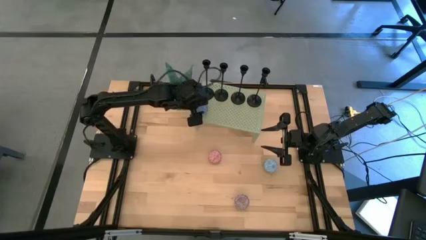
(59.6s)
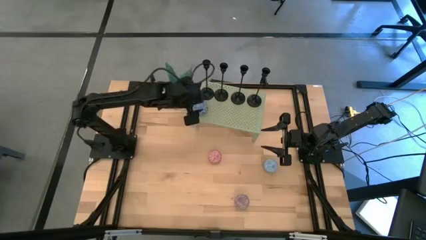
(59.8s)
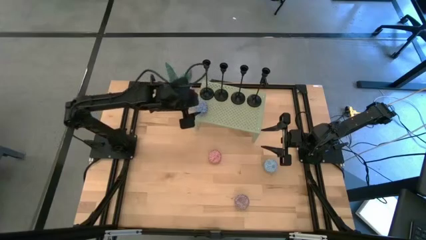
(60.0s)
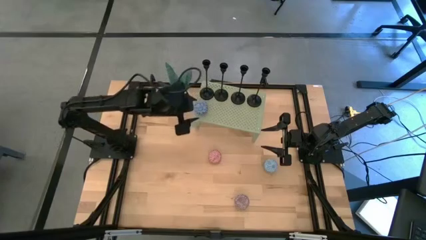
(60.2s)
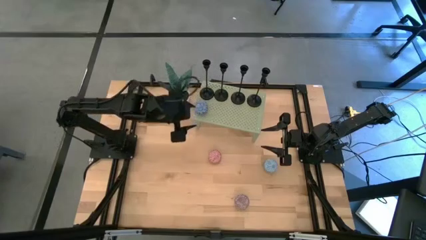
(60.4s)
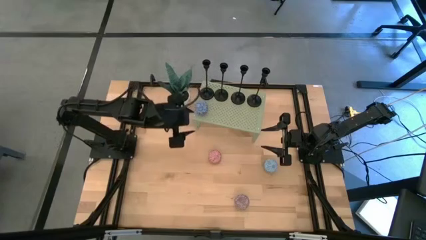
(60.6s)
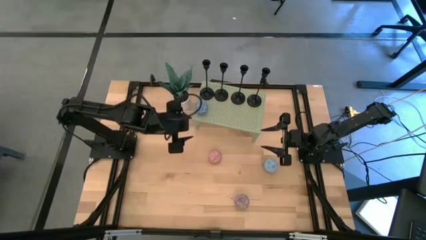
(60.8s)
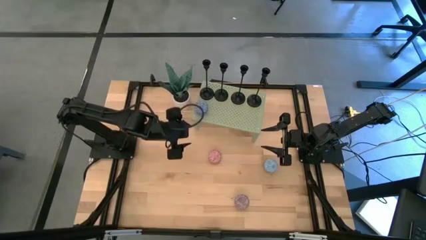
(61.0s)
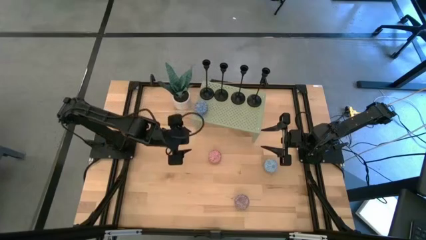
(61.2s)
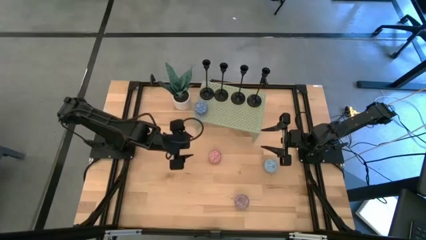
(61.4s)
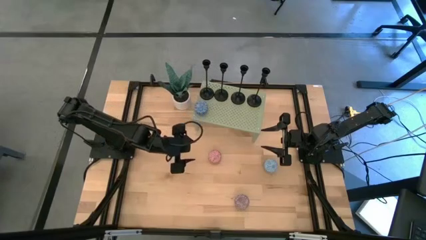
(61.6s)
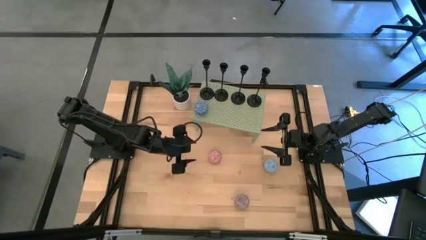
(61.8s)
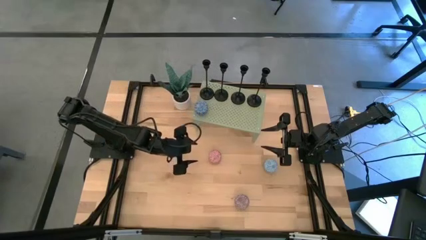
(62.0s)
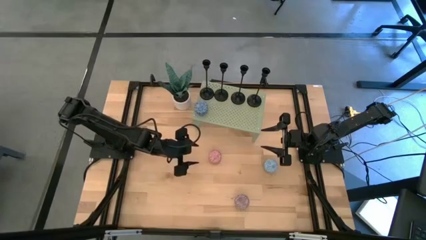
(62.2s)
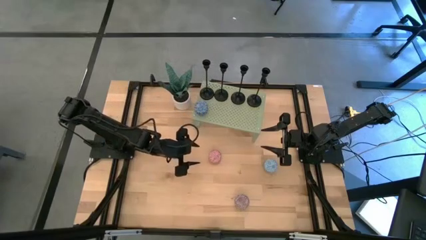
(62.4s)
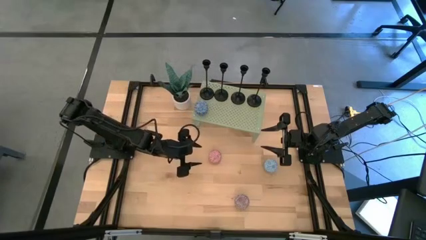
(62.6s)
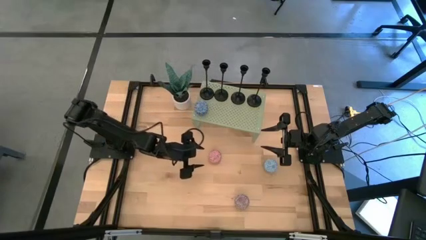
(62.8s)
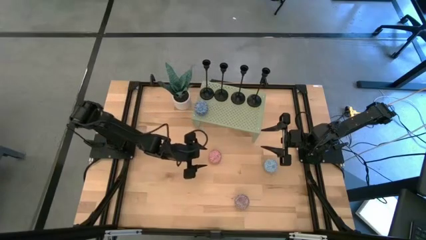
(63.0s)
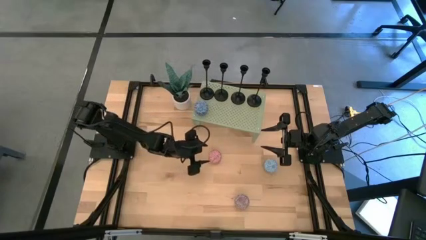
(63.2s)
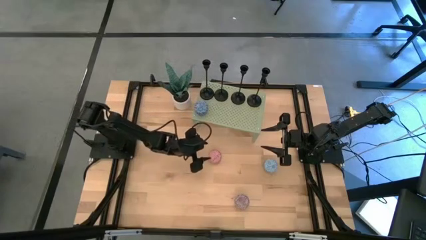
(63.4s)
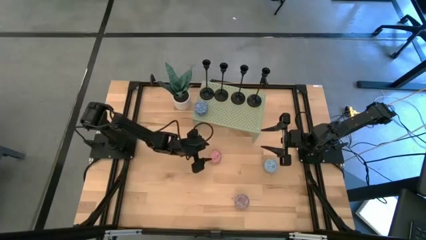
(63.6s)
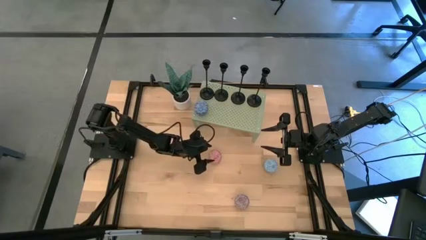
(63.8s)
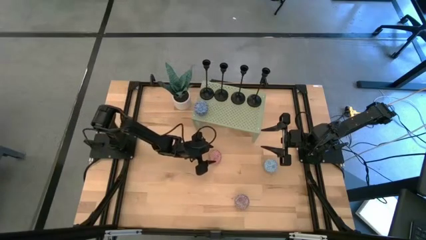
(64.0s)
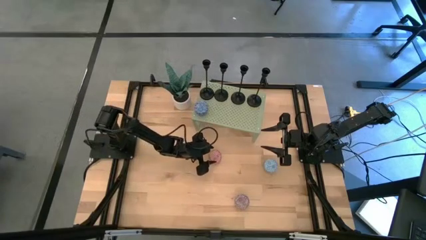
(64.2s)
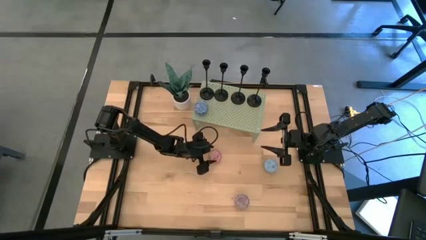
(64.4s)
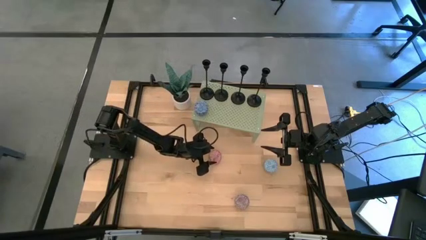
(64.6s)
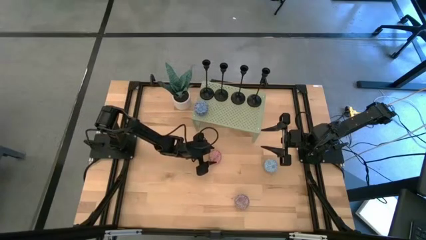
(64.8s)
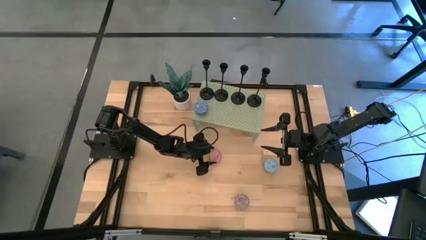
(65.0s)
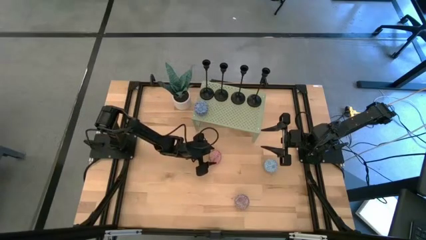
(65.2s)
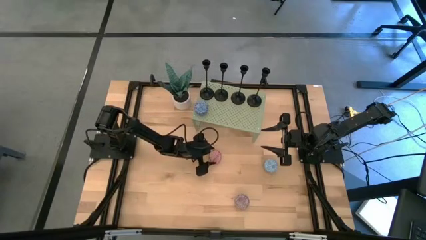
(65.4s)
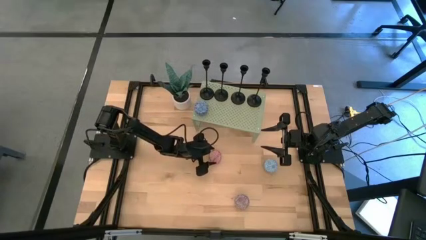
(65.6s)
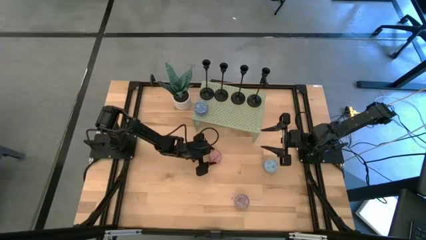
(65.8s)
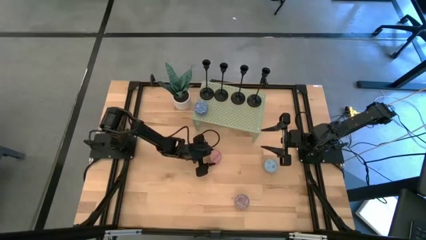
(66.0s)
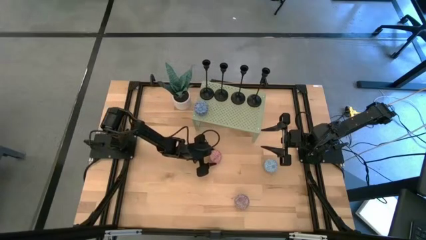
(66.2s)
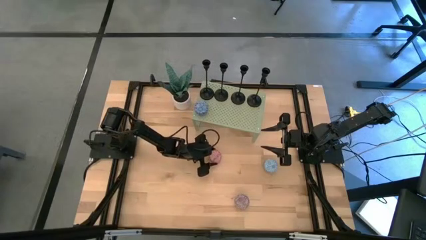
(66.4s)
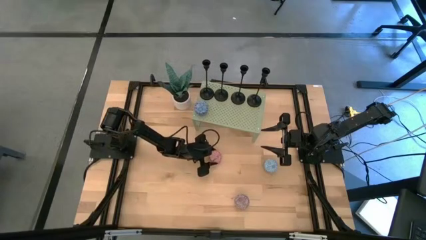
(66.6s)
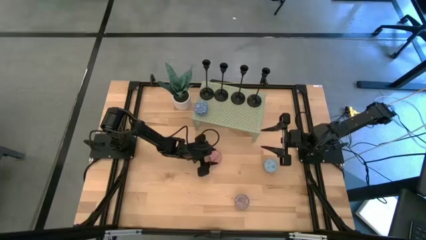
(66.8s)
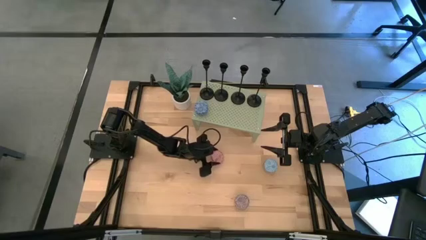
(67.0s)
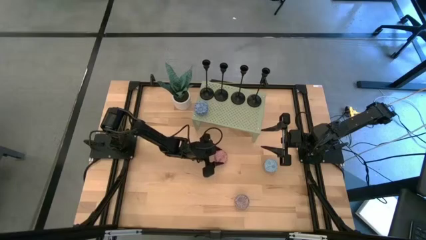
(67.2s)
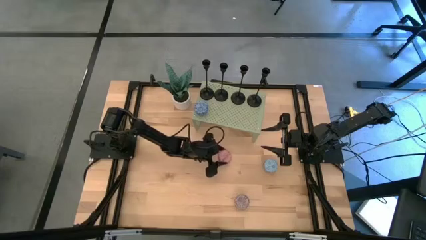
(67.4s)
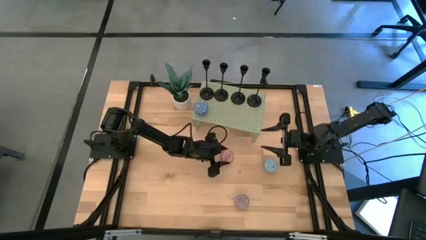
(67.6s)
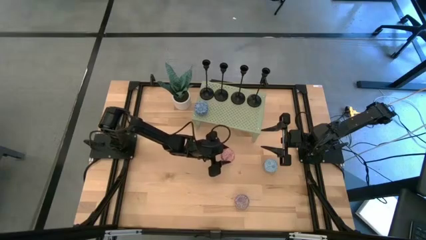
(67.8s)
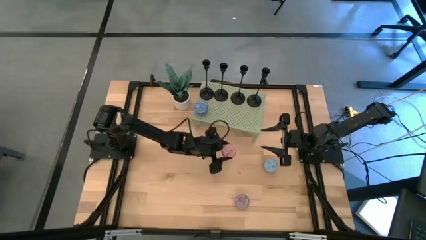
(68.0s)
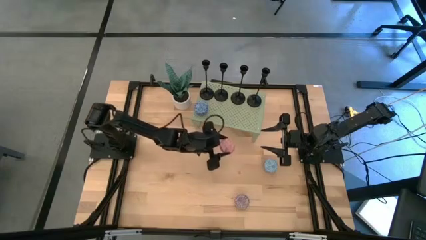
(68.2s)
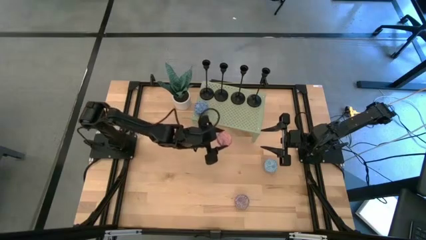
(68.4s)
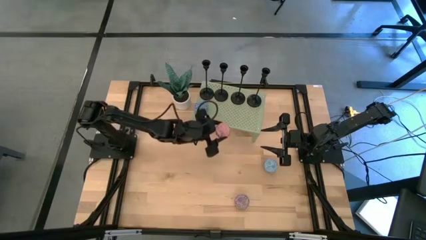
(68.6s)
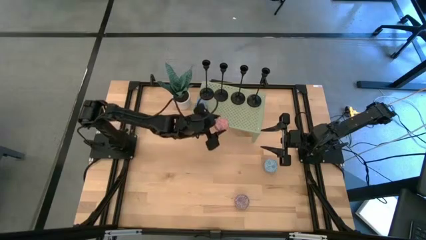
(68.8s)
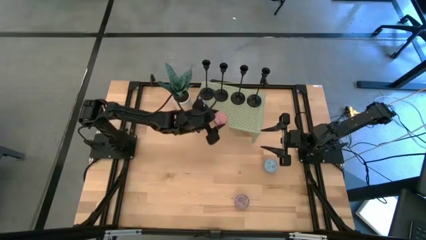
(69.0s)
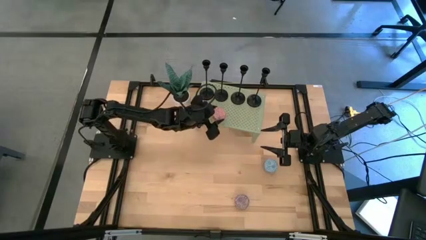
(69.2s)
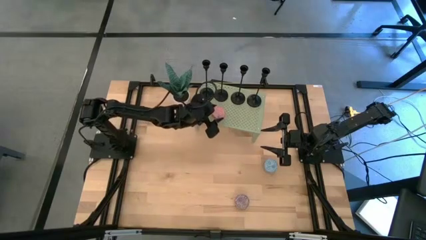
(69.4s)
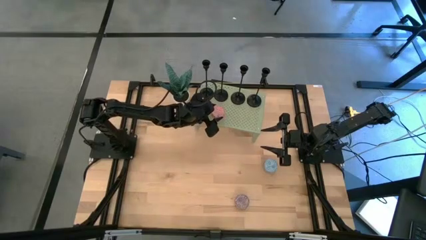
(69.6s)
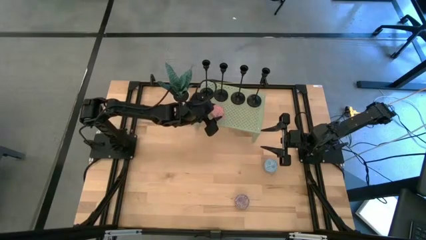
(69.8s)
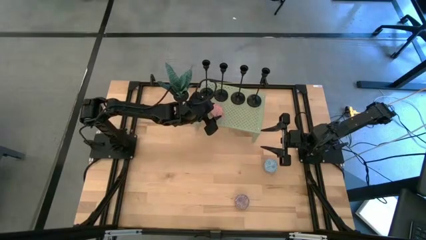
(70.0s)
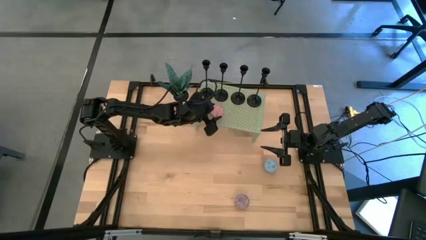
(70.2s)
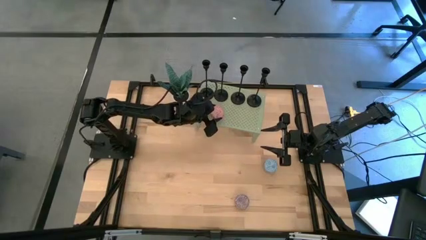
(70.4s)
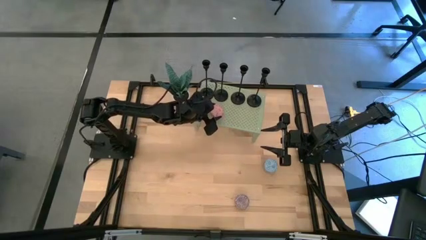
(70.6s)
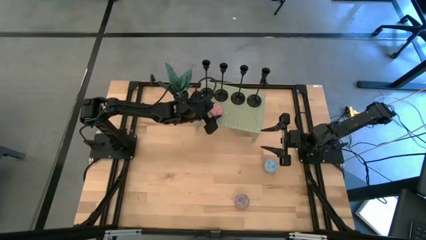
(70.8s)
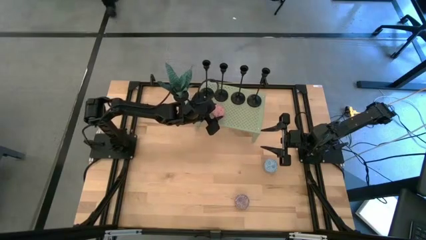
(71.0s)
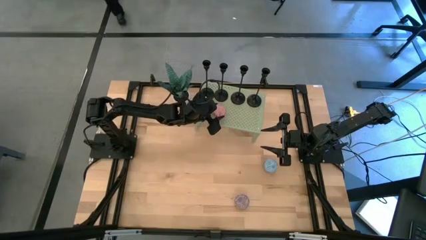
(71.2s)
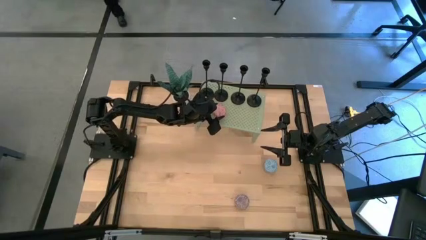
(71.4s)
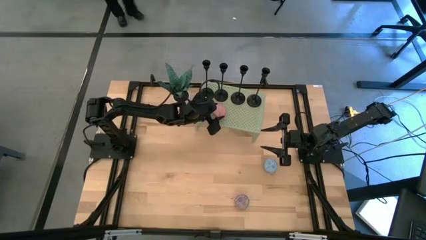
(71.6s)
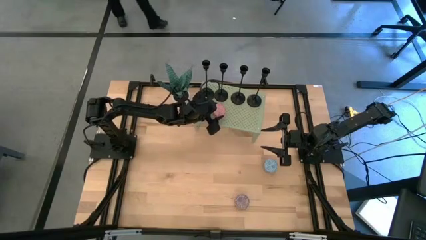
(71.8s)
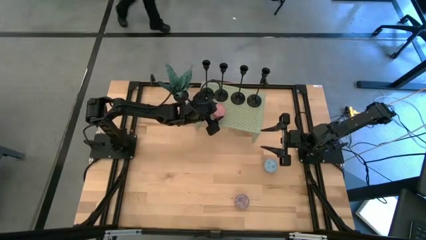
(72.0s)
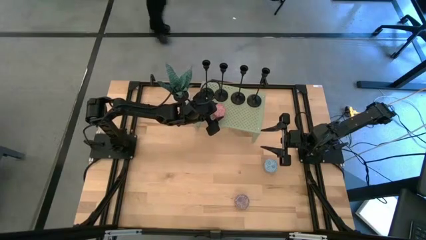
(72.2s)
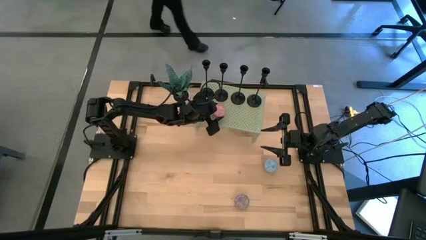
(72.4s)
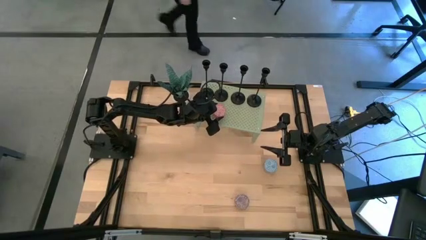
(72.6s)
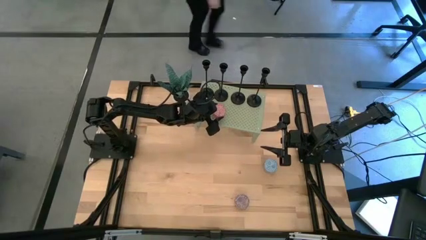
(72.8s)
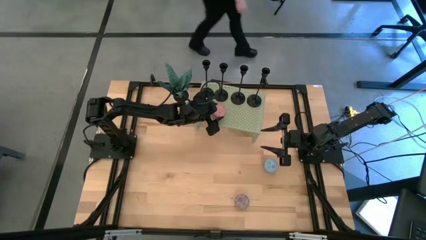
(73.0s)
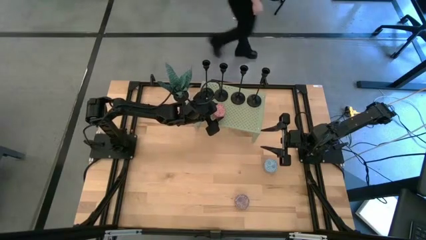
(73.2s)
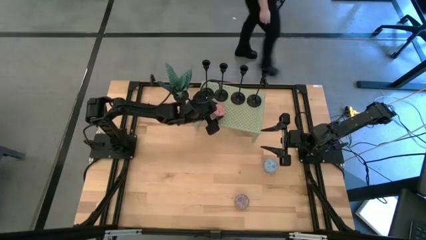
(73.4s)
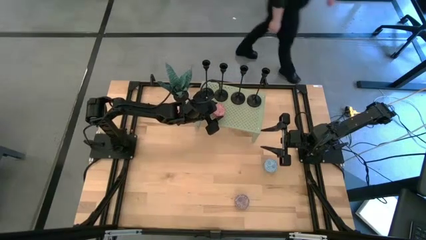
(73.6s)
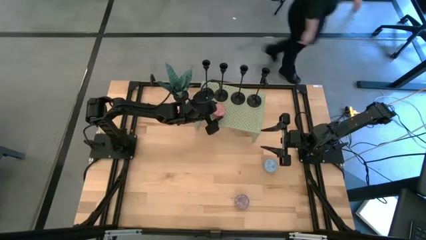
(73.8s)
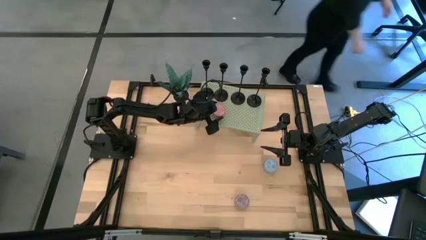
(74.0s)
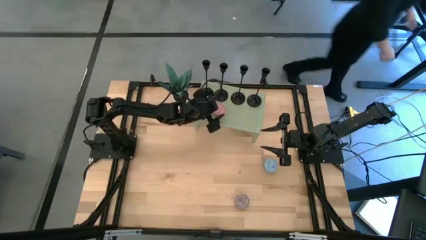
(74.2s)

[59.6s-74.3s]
Task: Pick & Place candle stick holders
Put the pink scented candle on the shelf aligned with the other blue scented candle
